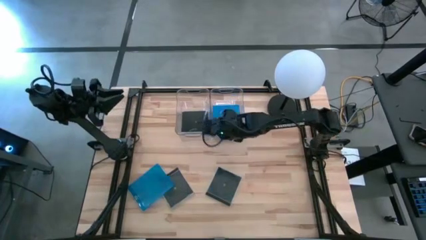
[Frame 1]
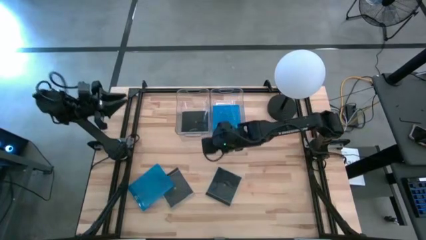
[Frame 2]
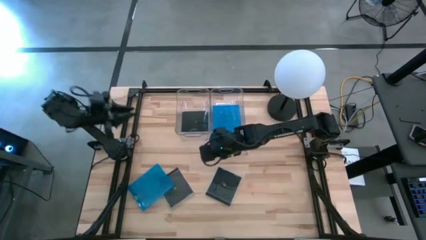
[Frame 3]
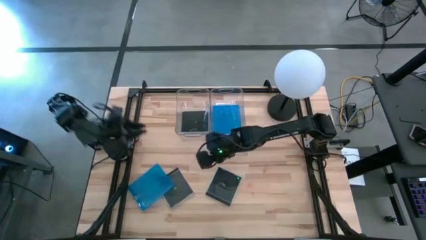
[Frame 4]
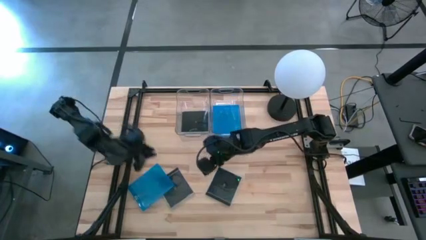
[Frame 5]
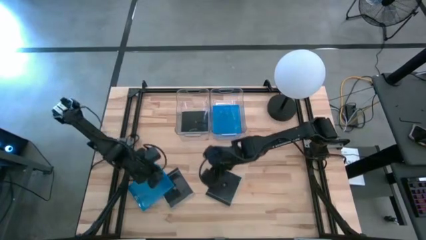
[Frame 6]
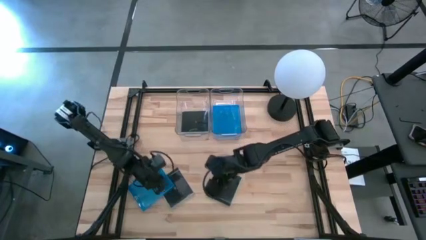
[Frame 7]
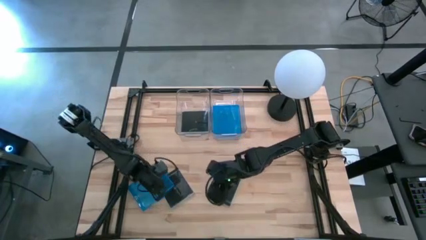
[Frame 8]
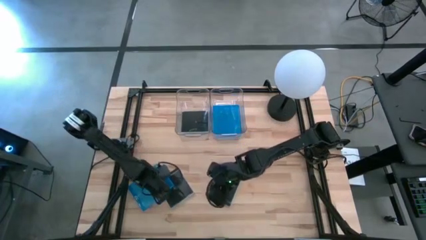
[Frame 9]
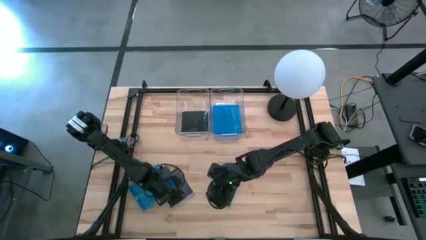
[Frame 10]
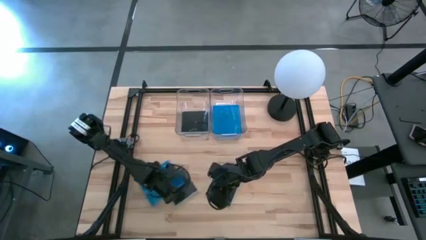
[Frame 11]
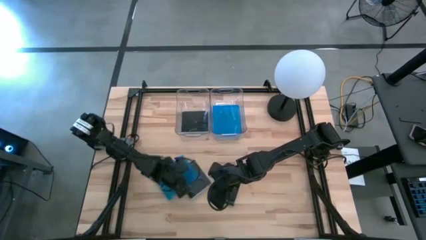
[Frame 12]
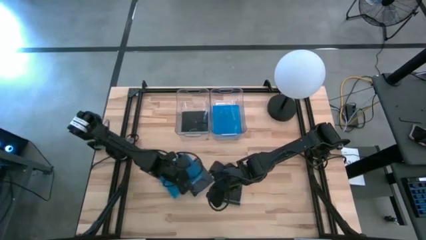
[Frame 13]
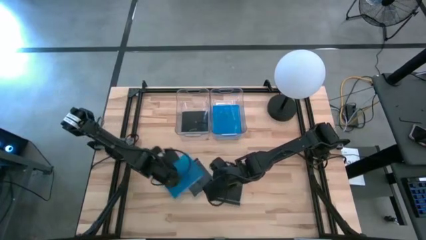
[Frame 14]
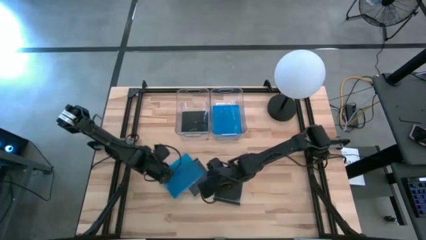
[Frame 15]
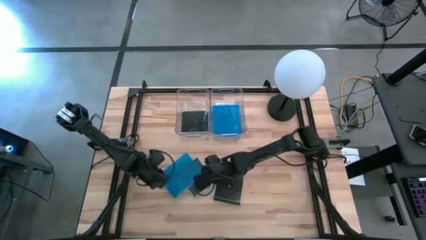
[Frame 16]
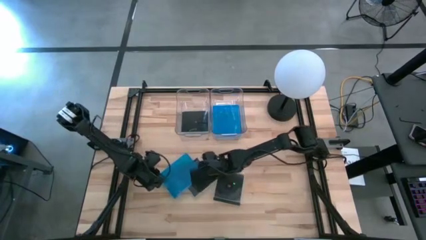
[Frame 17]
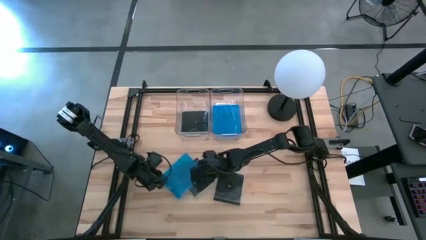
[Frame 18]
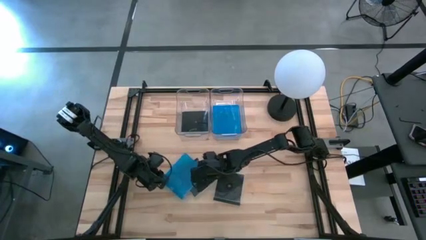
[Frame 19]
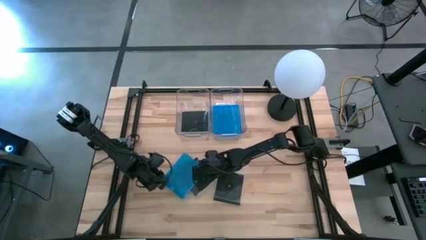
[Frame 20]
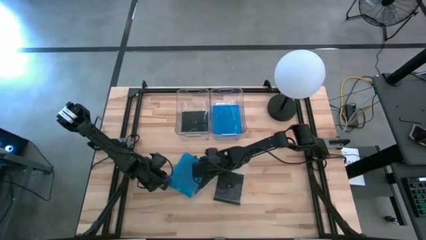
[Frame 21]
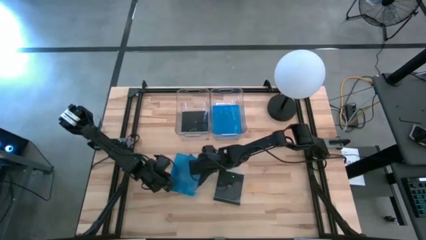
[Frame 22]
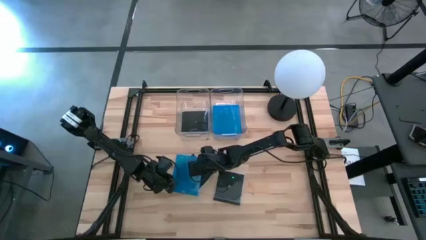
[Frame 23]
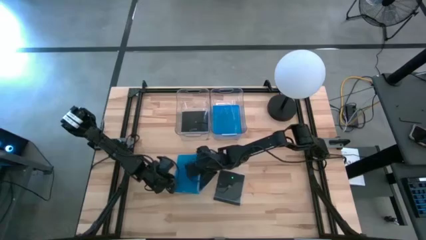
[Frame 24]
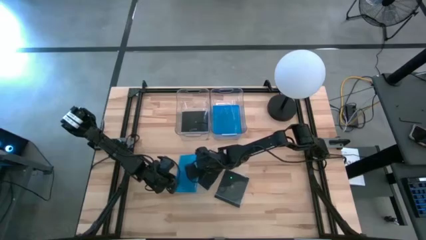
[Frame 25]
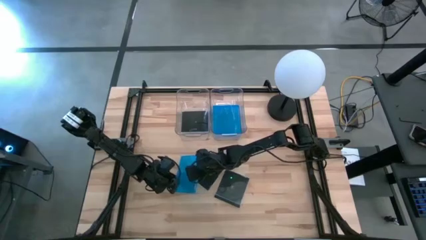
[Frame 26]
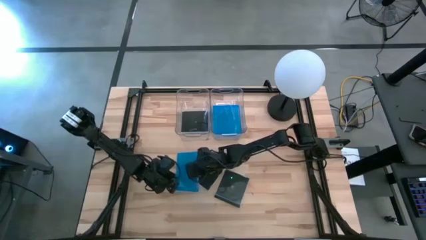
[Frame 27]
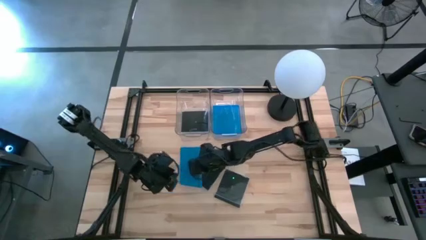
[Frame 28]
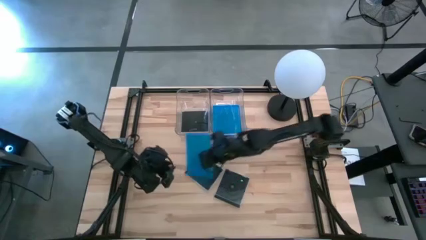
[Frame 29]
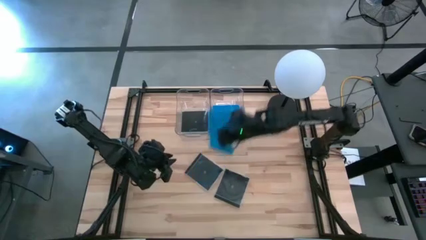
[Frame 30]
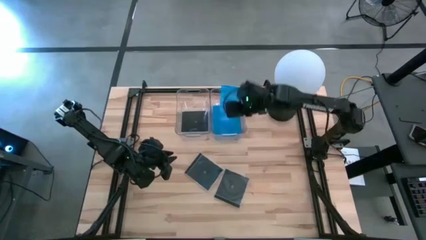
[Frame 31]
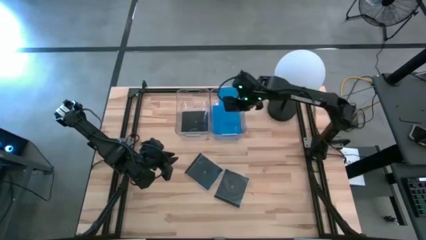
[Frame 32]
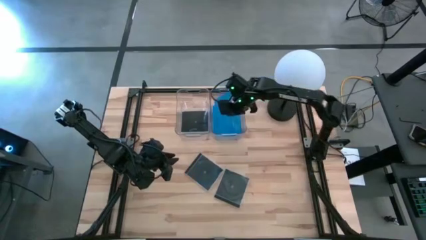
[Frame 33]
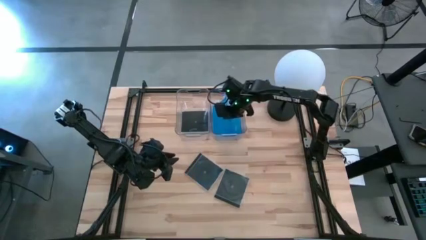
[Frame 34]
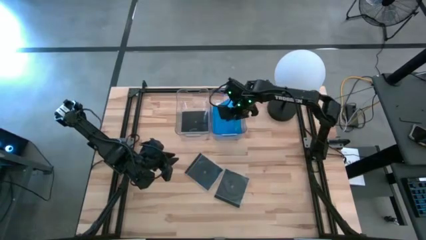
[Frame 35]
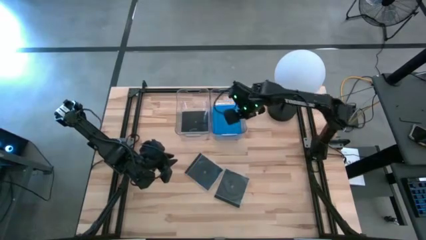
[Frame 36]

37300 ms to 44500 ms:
Task: Pick & place jewel cases by type
Put the blue CD case into the right transparent bin

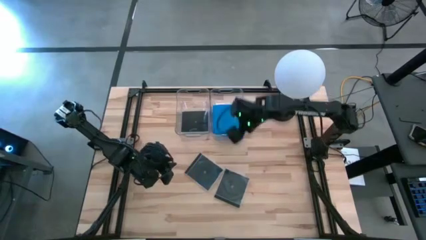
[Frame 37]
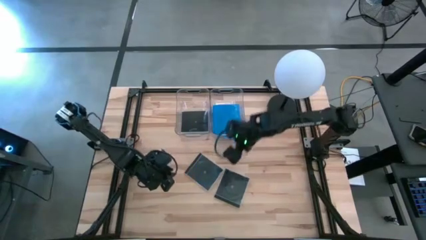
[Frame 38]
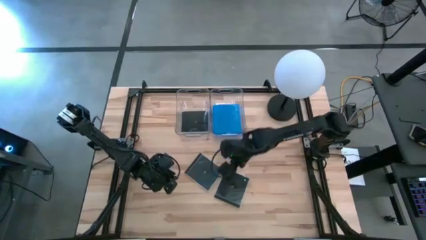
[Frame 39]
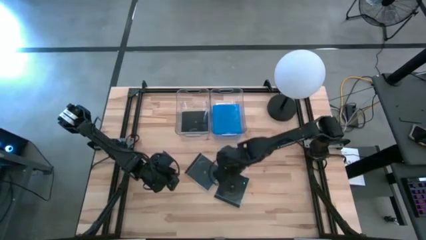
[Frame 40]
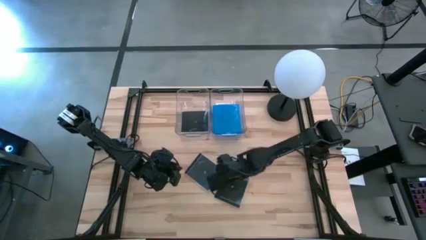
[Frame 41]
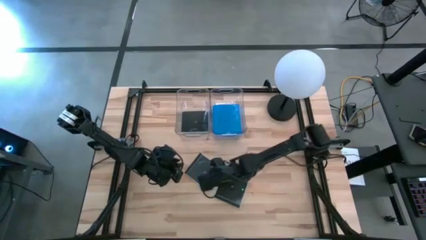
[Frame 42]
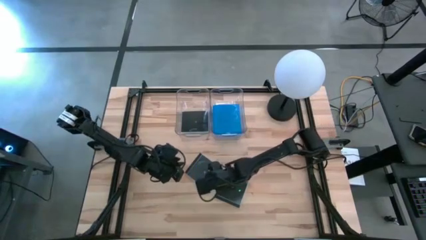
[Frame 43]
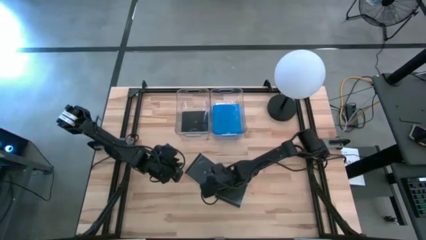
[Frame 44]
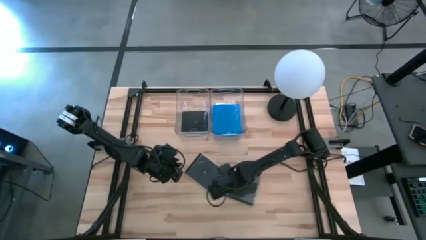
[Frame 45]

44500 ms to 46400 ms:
Move the right black CD case slightly right on the table

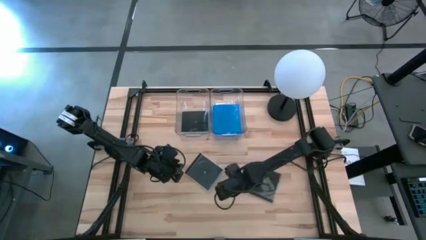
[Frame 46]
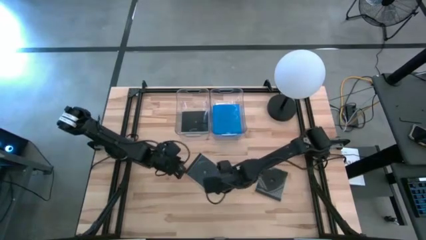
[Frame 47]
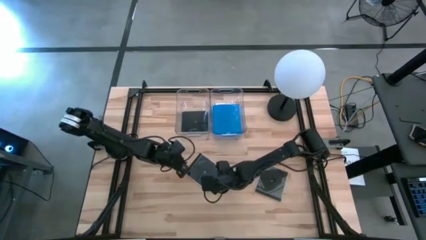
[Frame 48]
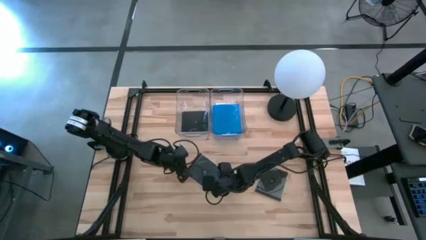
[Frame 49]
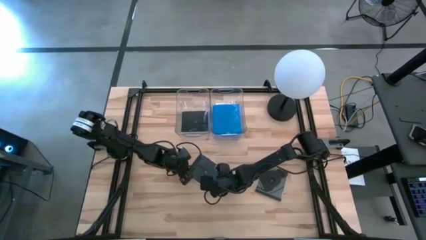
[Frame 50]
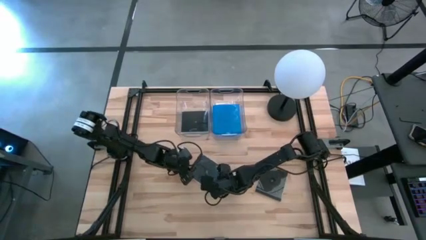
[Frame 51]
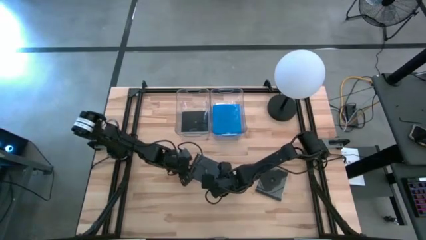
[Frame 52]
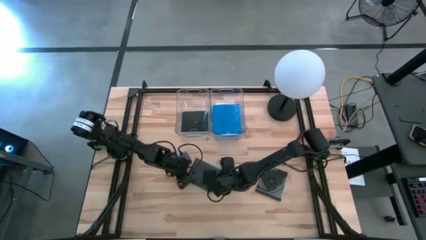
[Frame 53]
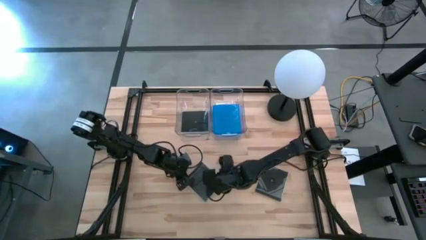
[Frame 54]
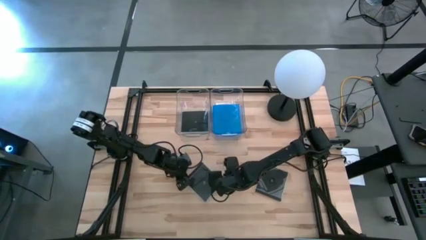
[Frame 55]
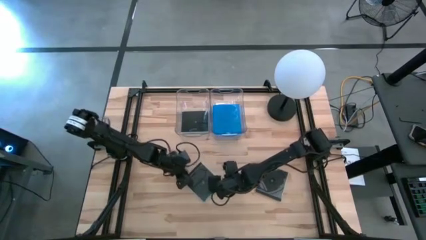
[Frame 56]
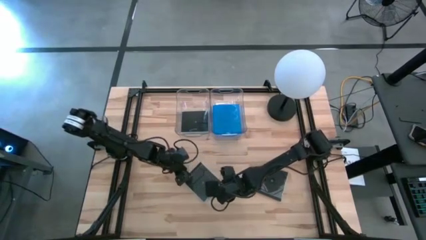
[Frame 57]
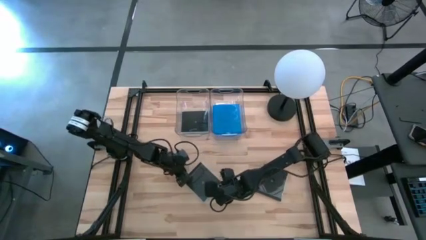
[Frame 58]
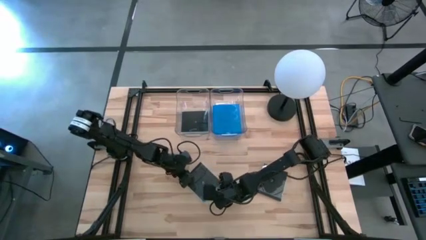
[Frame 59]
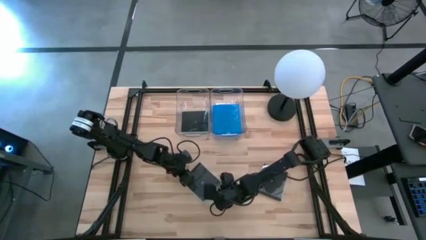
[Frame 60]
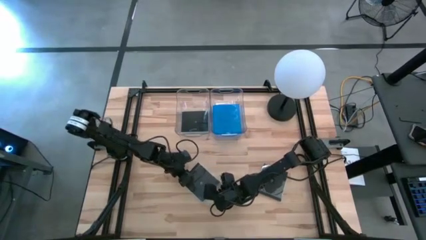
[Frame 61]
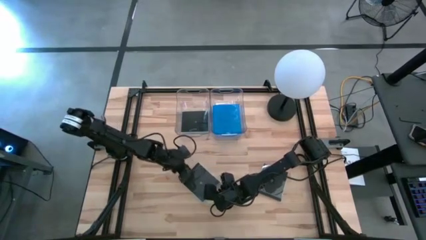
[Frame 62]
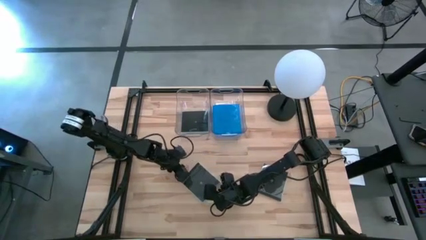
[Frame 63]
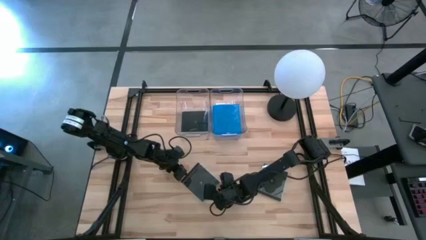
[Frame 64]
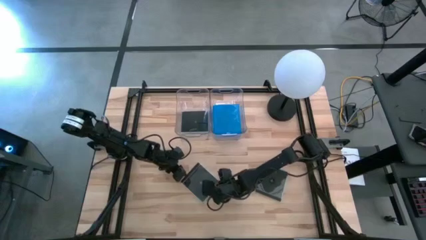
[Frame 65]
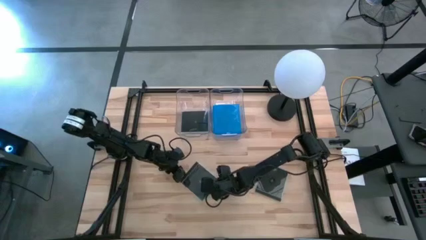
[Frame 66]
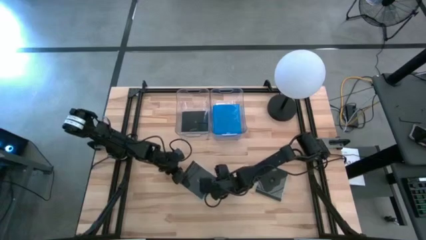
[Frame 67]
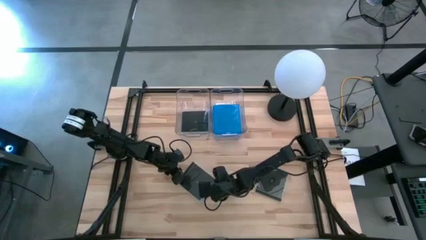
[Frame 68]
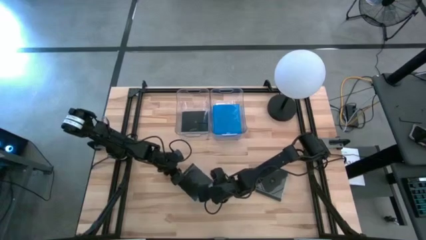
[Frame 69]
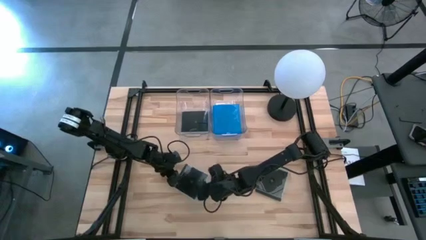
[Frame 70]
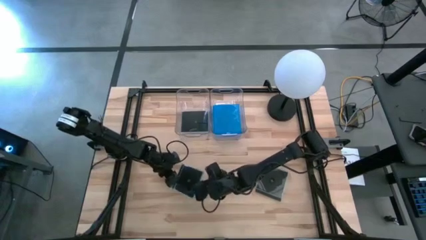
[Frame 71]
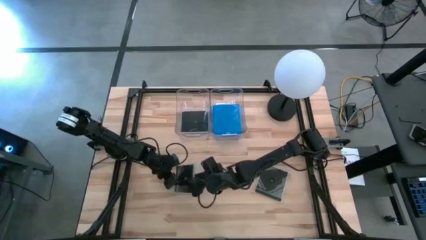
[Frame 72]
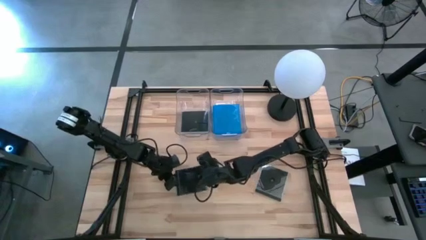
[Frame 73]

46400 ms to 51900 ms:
Put the left black CD case into the left transparent bin
